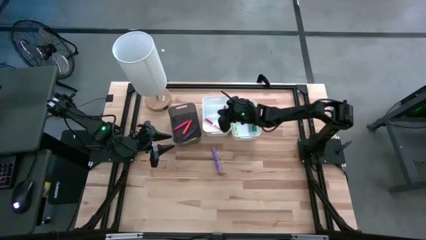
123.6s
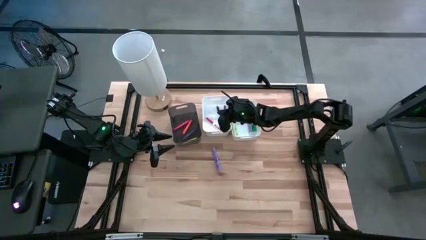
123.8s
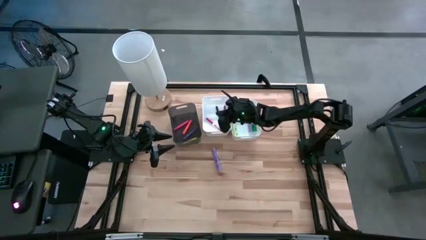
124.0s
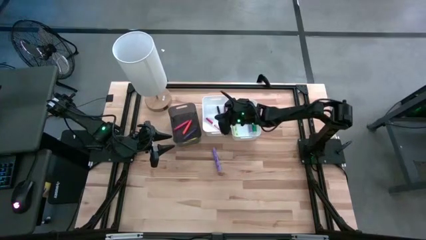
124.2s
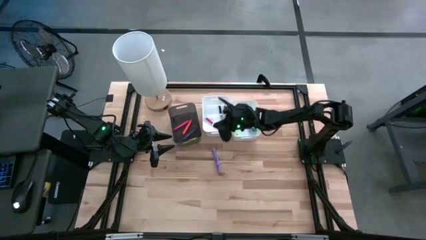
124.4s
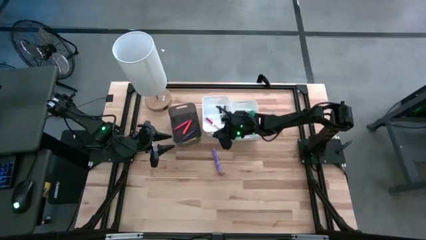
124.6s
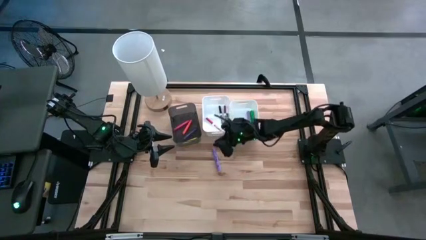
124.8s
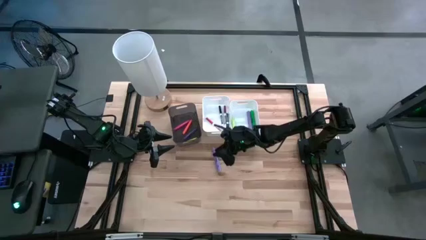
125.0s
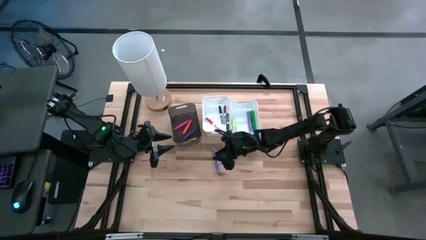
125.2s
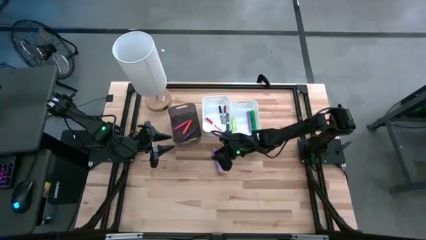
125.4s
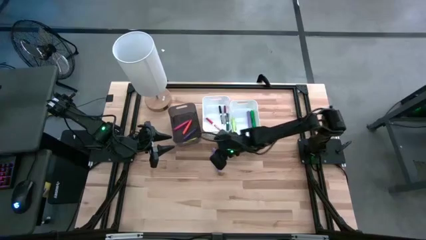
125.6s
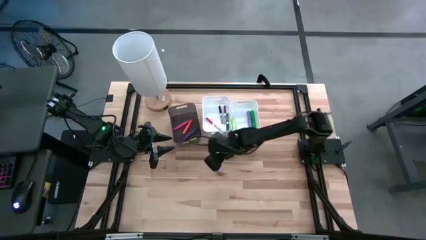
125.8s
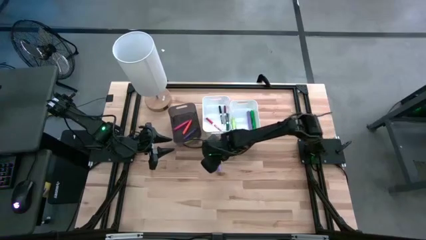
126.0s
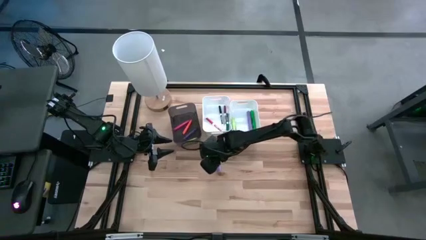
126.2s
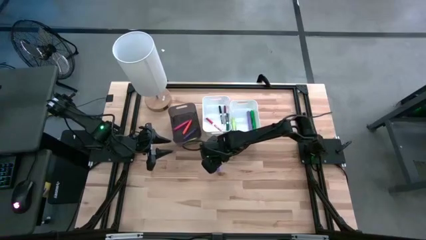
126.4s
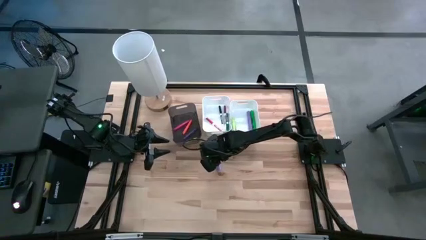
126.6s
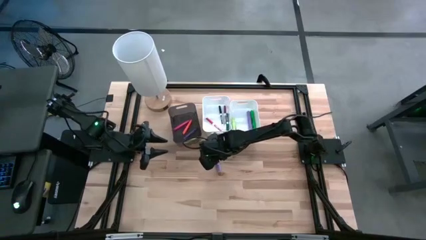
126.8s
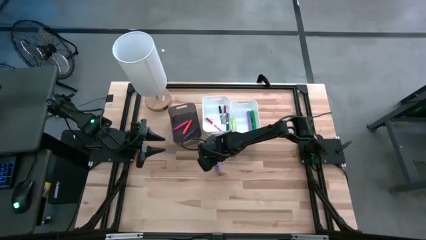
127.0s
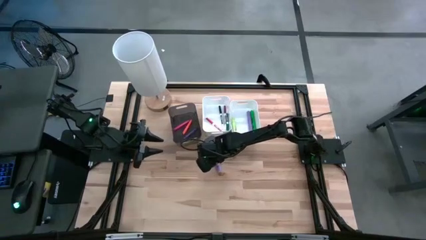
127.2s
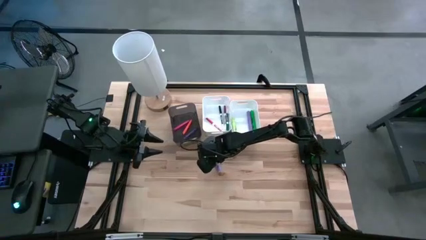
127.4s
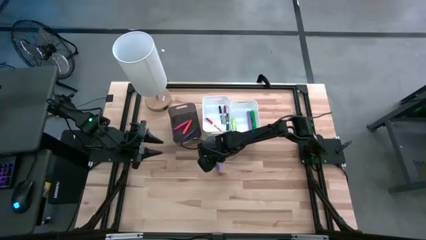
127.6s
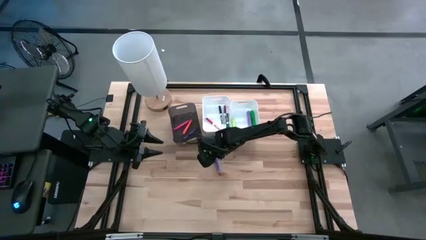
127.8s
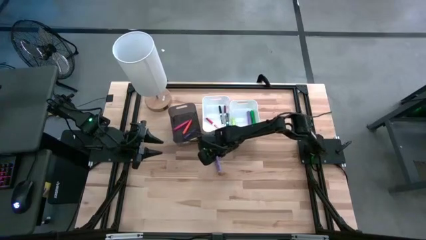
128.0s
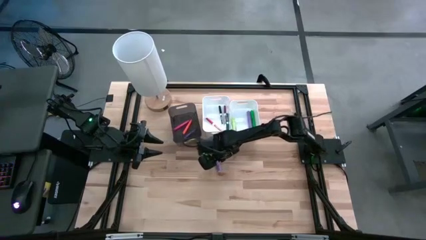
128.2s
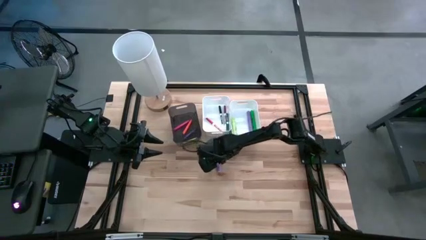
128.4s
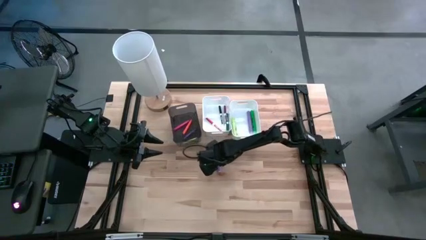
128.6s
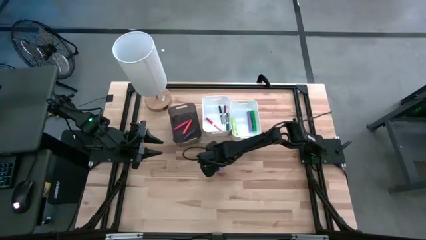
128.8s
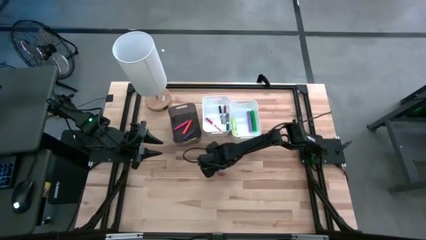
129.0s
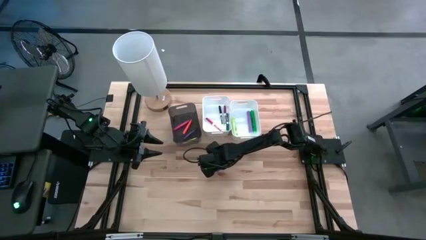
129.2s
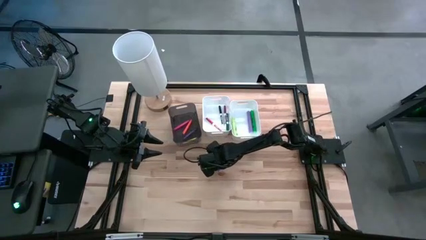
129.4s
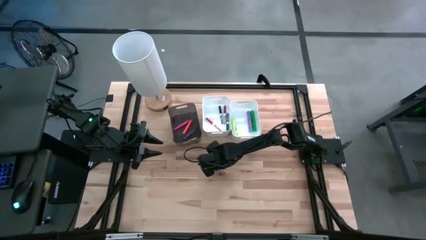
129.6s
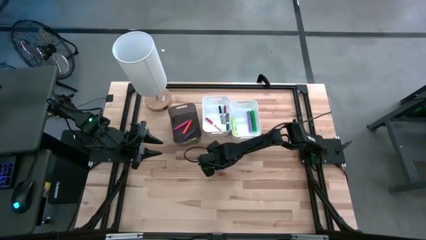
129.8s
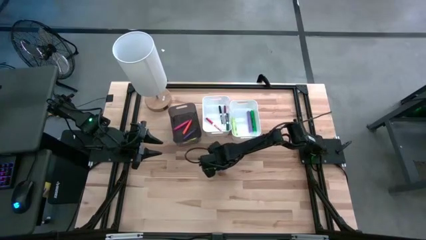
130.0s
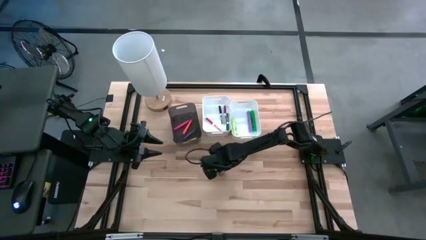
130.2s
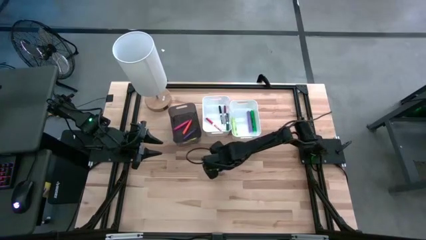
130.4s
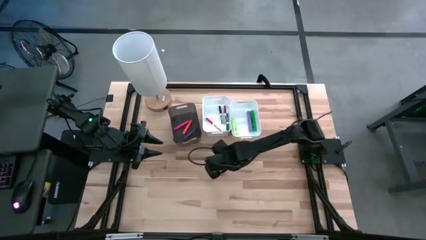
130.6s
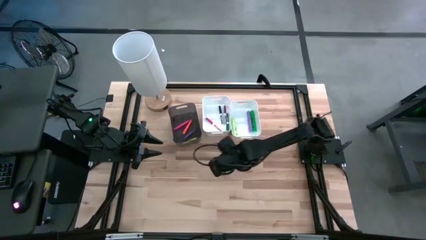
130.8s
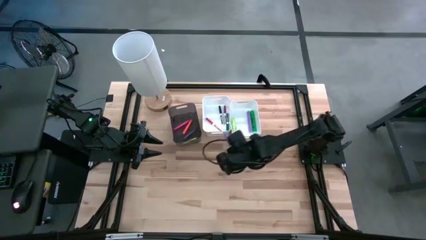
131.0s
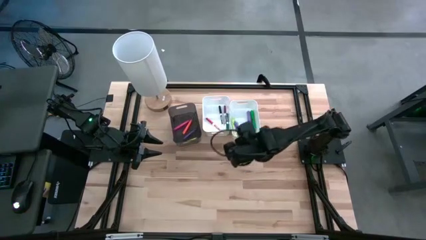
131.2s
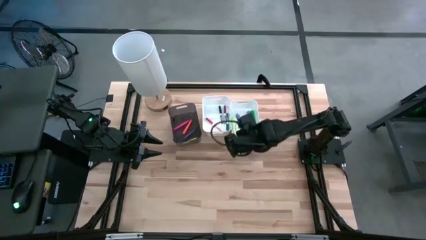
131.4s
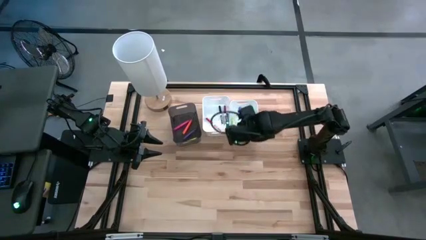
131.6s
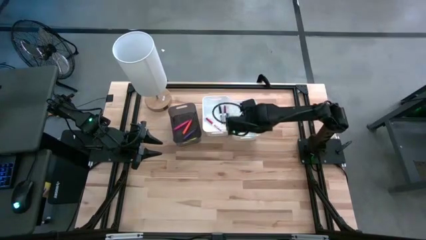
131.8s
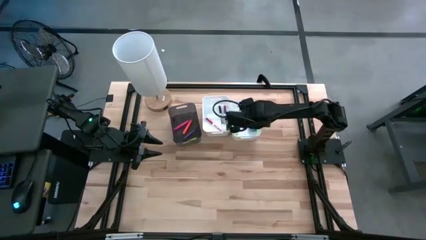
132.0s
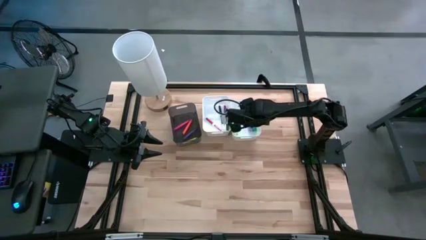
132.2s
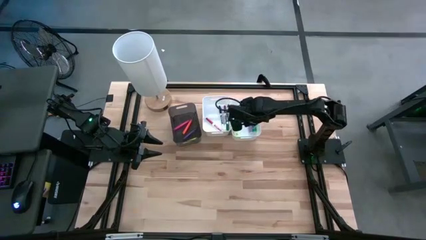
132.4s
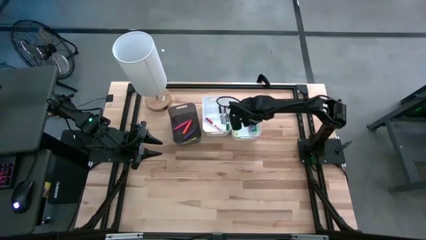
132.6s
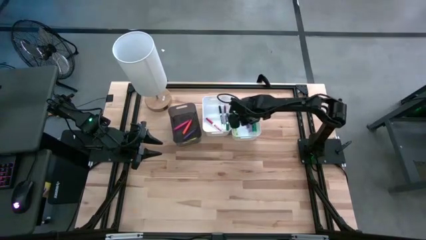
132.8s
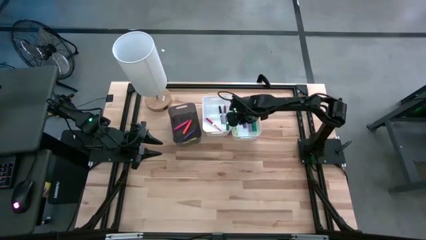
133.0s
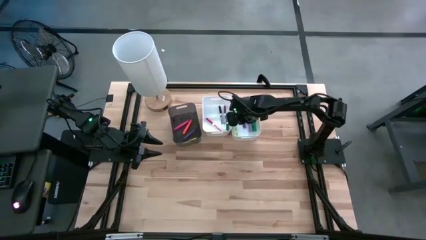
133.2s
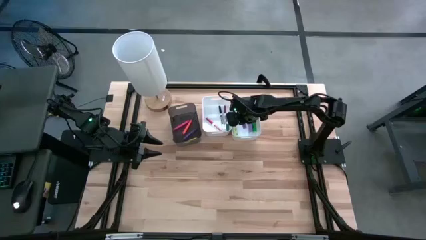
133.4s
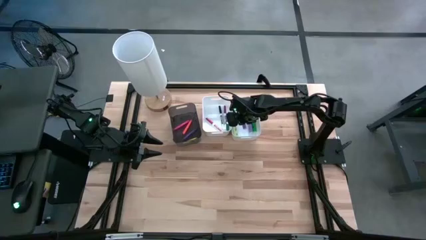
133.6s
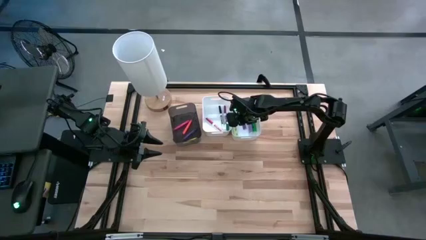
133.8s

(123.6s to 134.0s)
Task: Pick & Place Markers
Put the purple highlighter pen into the right white bin

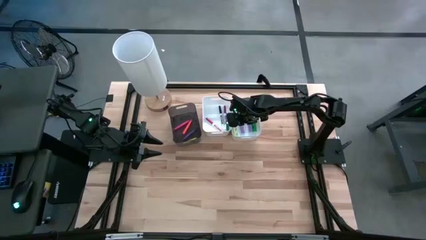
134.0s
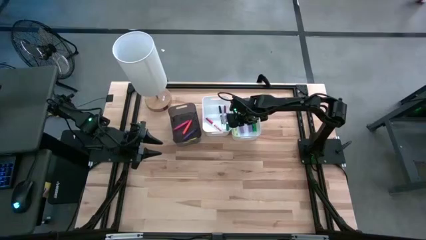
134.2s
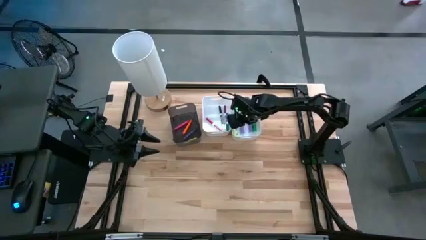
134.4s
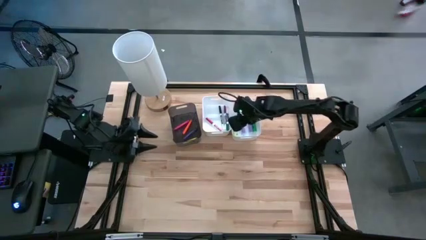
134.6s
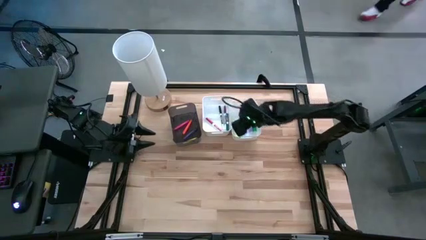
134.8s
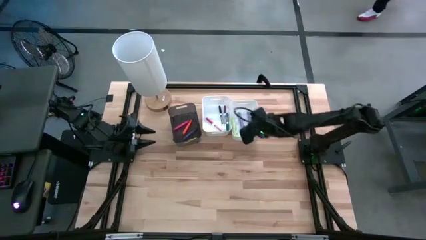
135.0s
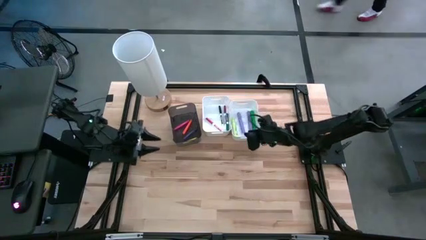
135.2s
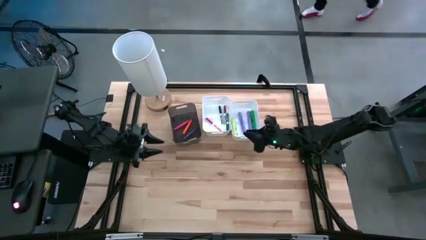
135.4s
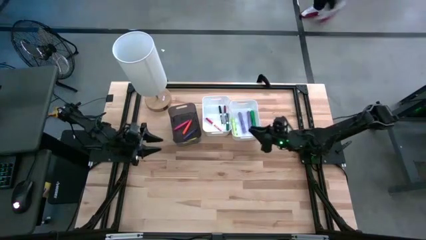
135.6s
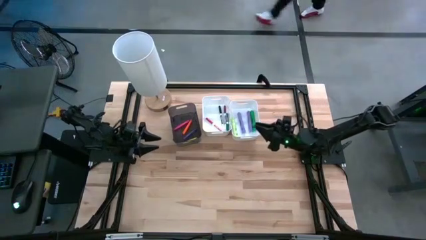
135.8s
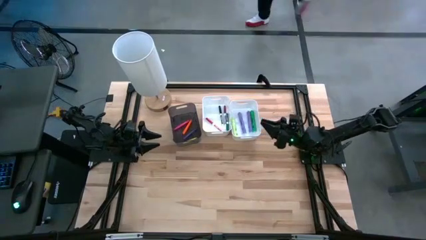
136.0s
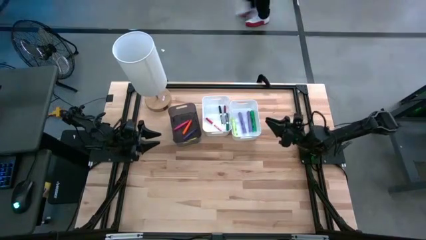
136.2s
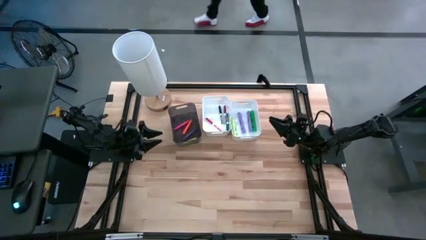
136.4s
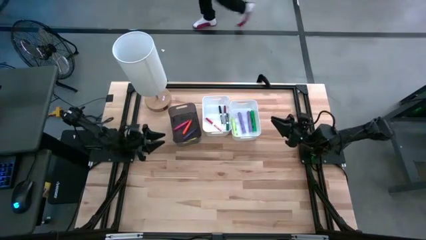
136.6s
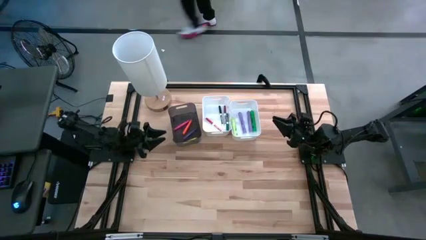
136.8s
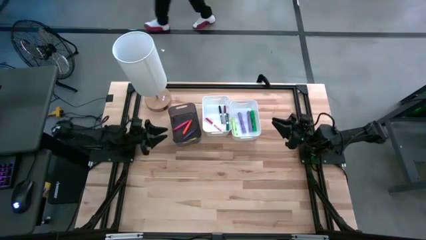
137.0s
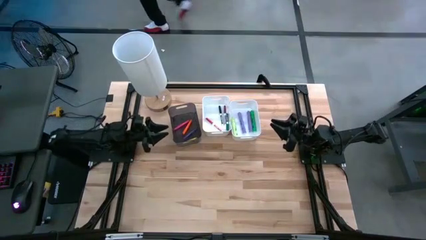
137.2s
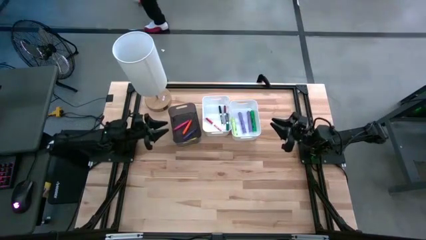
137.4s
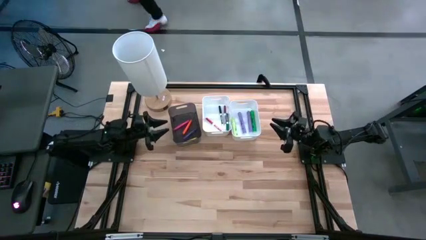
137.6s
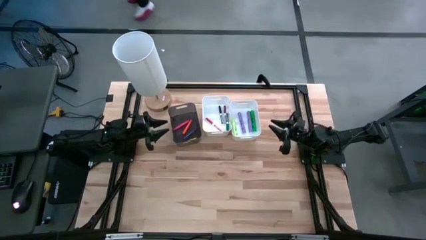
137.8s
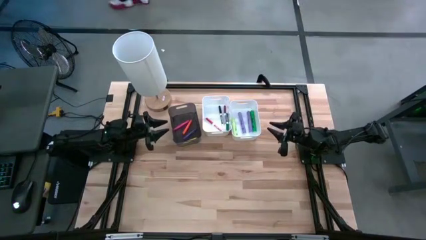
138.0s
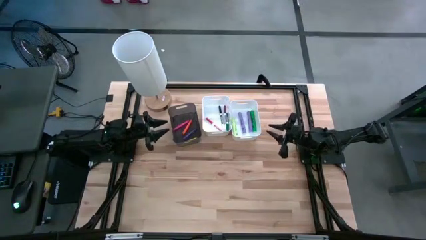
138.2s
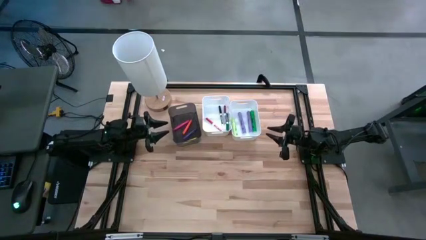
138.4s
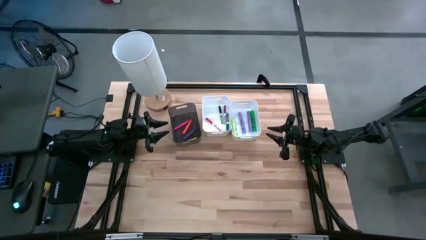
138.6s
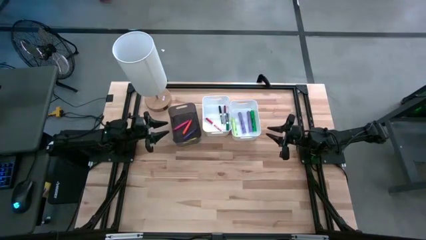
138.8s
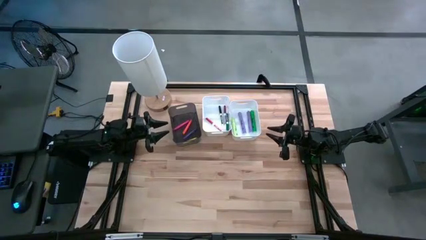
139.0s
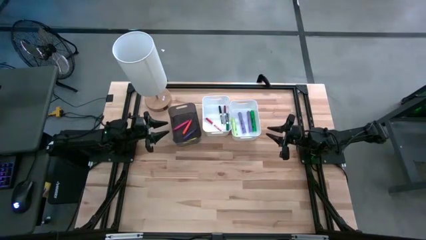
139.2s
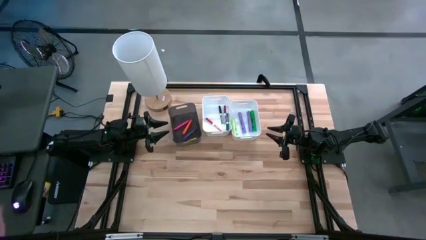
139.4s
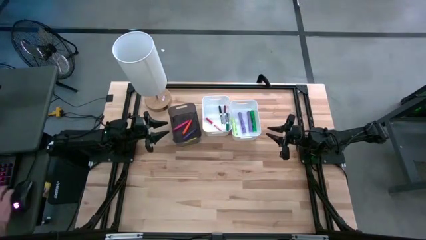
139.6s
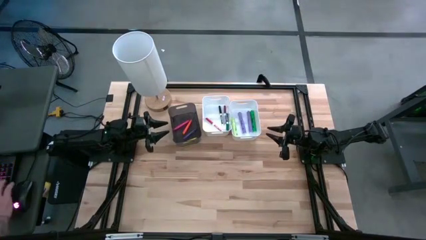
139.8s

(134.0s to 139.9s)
Return to Home Position

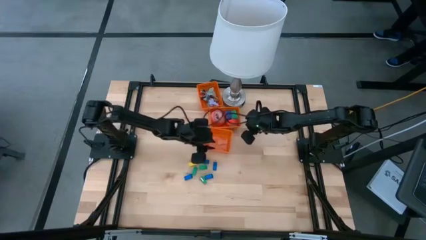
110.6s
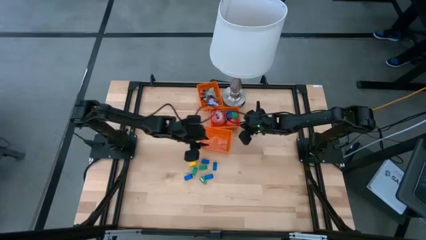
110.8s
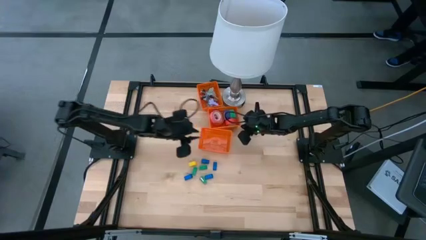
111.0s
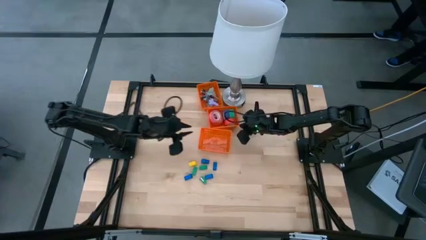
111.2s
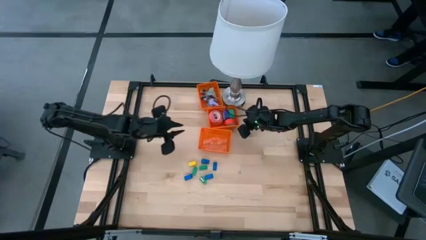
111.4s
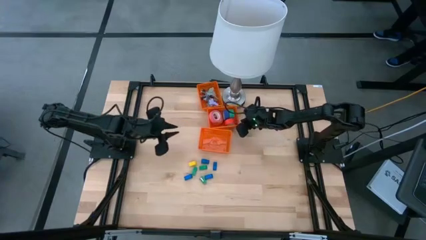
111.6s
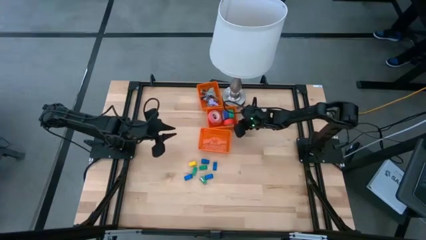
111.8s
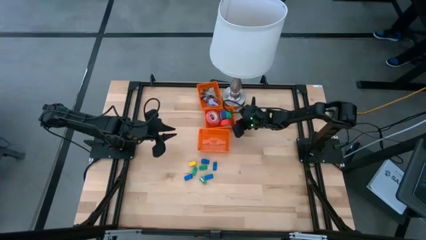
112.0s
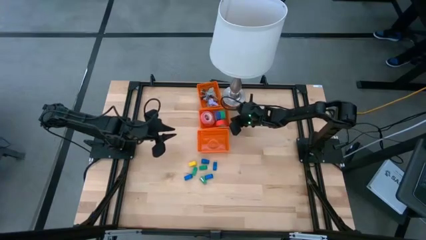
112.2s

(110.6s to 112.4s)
Task: Pick and place Stapler, Stapler remover, tape
Adjust the middle orange basket
